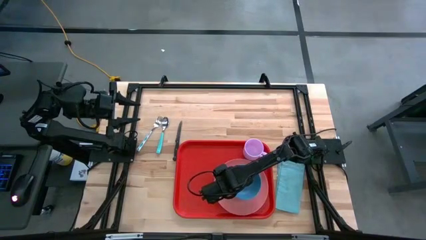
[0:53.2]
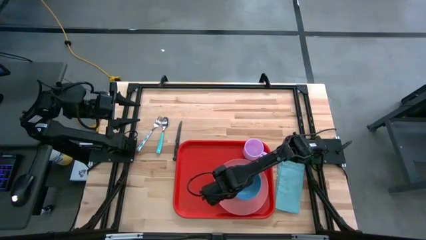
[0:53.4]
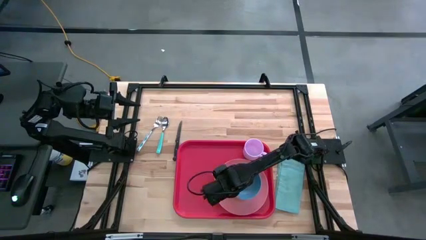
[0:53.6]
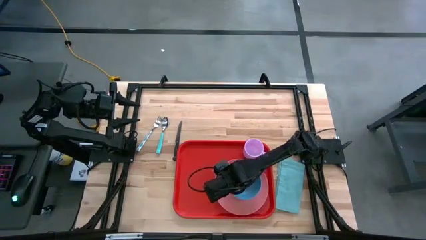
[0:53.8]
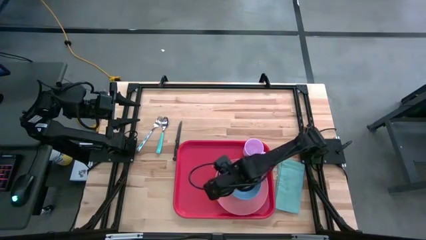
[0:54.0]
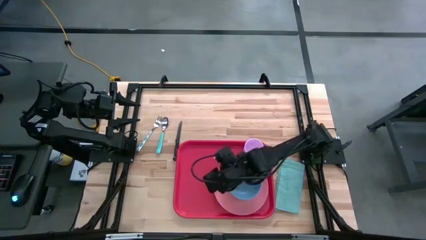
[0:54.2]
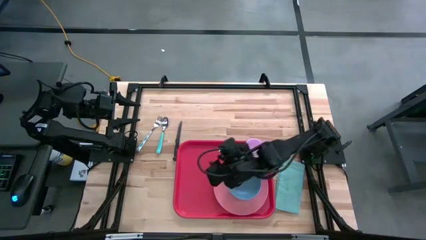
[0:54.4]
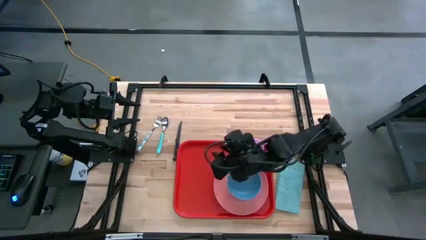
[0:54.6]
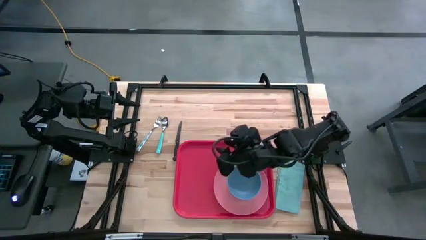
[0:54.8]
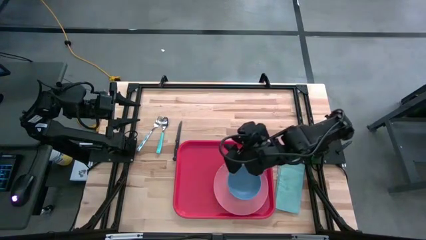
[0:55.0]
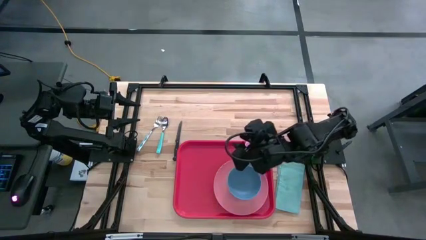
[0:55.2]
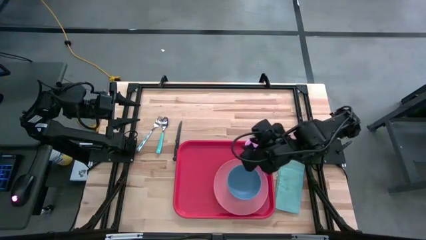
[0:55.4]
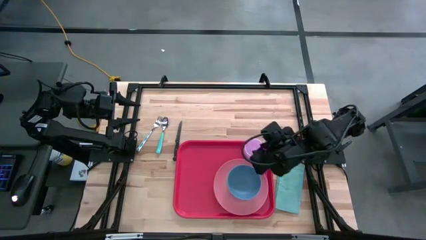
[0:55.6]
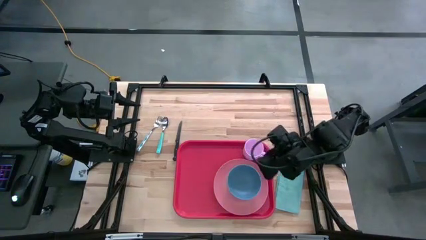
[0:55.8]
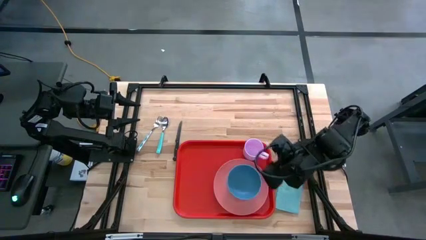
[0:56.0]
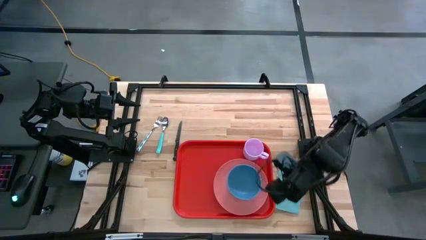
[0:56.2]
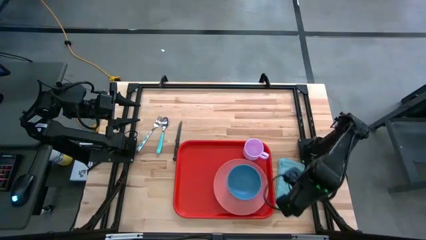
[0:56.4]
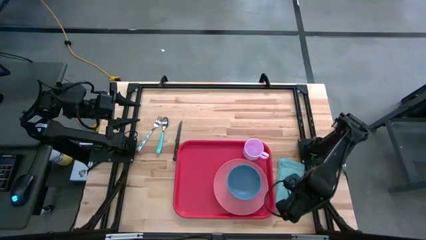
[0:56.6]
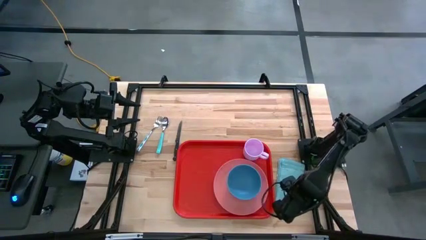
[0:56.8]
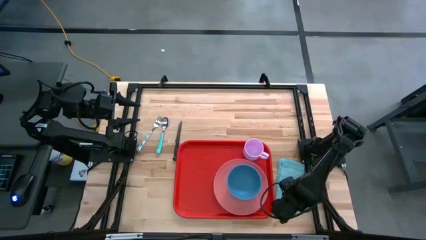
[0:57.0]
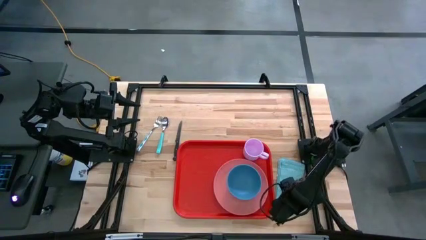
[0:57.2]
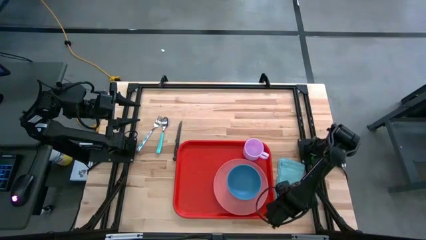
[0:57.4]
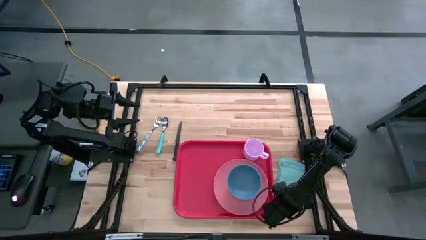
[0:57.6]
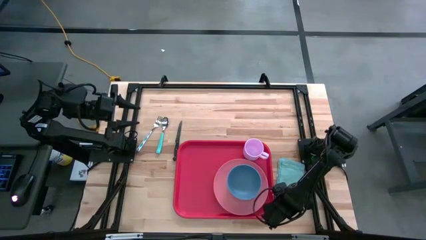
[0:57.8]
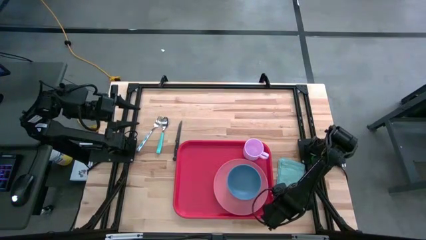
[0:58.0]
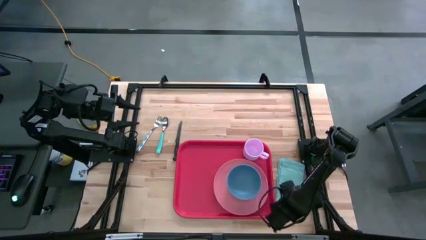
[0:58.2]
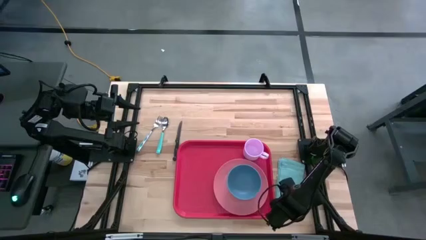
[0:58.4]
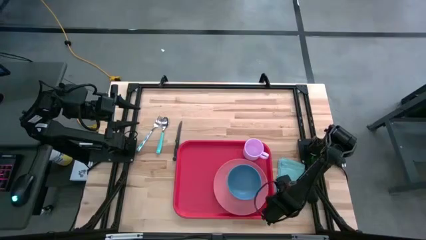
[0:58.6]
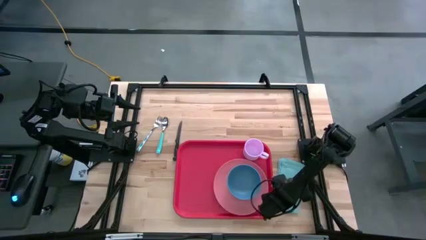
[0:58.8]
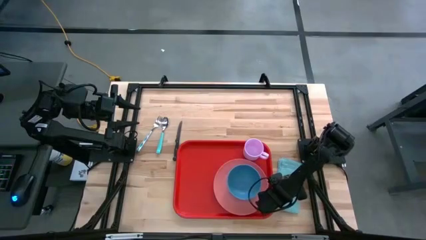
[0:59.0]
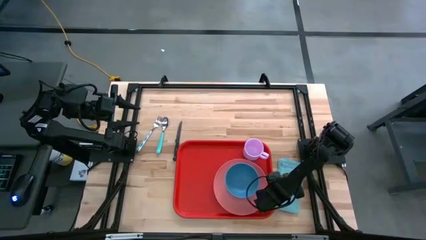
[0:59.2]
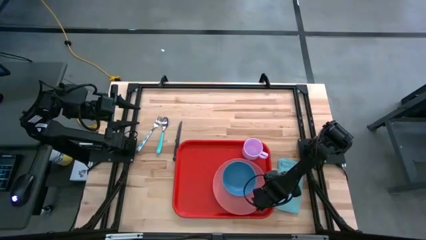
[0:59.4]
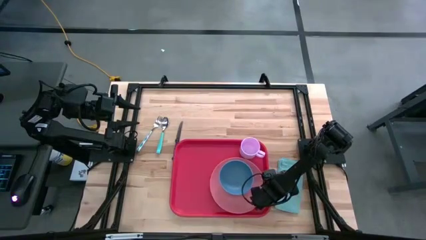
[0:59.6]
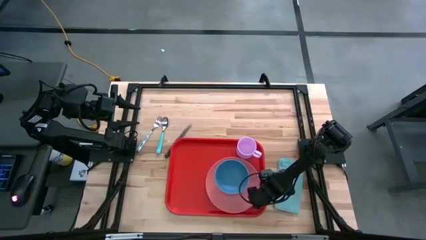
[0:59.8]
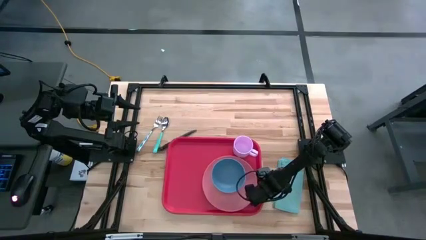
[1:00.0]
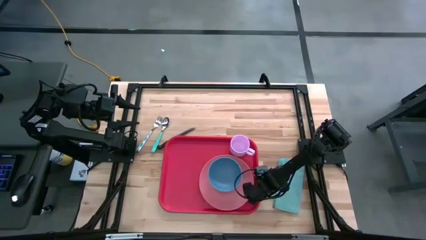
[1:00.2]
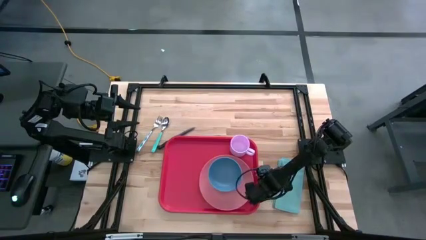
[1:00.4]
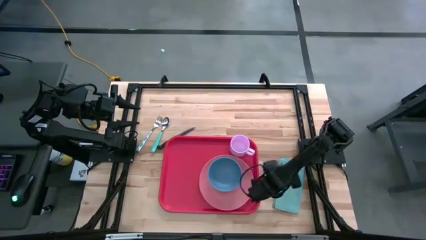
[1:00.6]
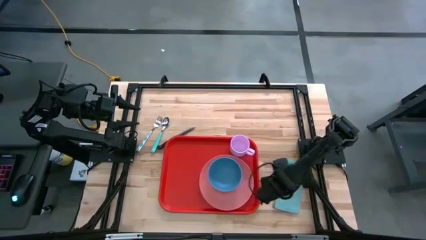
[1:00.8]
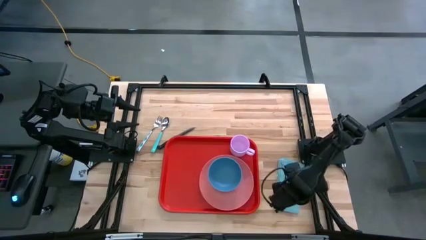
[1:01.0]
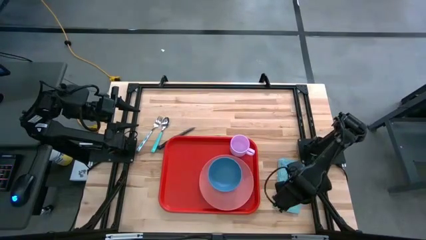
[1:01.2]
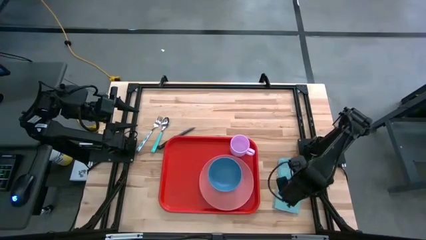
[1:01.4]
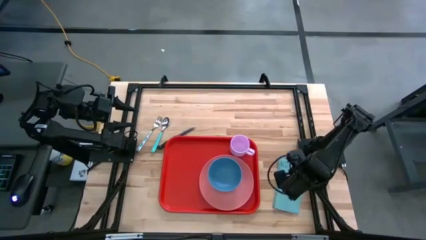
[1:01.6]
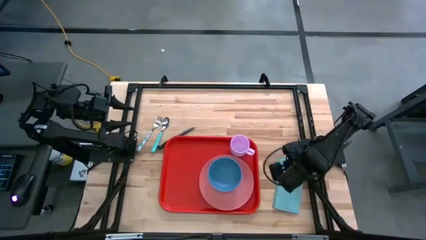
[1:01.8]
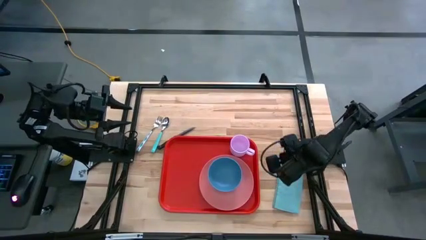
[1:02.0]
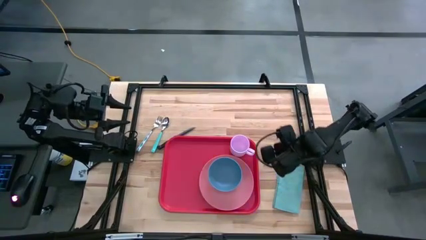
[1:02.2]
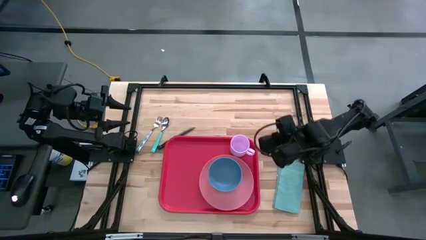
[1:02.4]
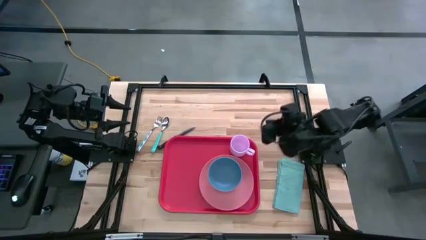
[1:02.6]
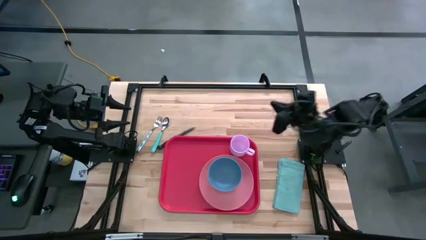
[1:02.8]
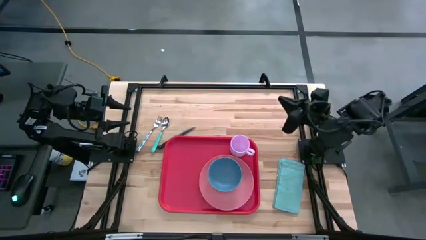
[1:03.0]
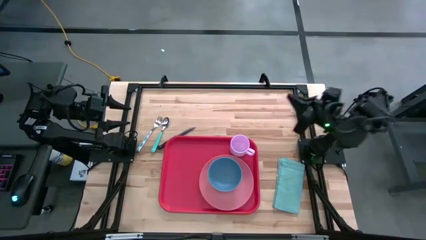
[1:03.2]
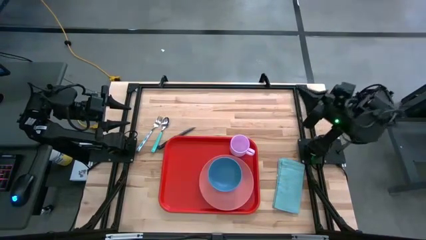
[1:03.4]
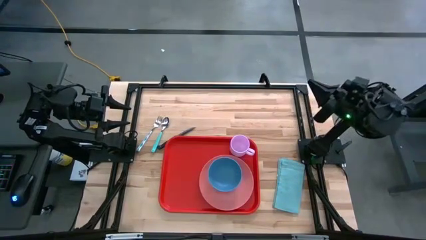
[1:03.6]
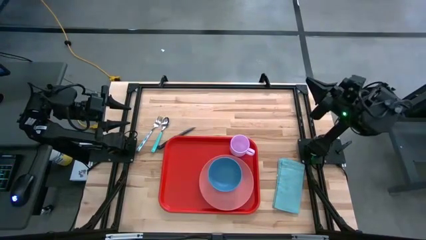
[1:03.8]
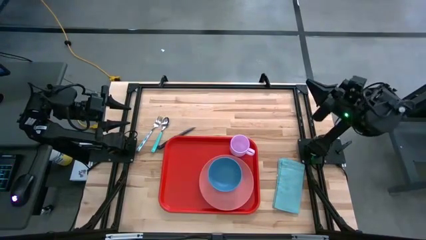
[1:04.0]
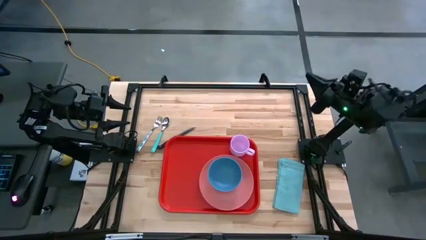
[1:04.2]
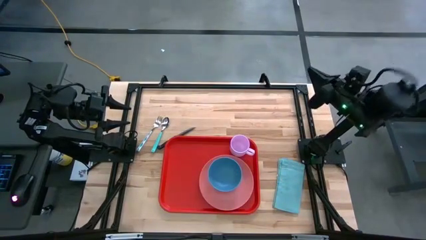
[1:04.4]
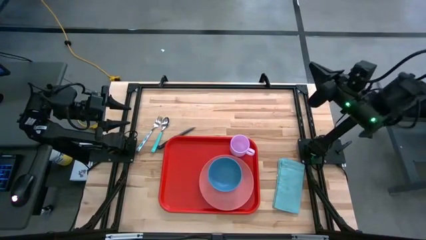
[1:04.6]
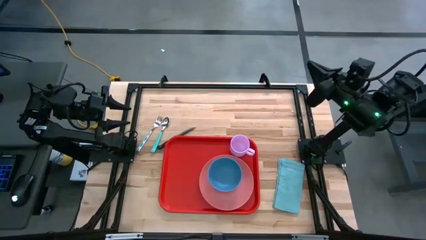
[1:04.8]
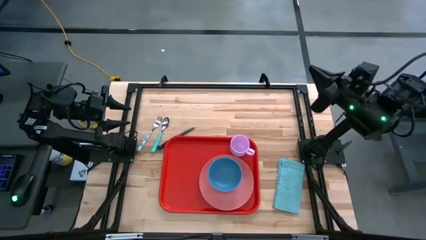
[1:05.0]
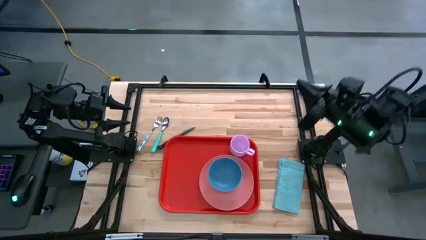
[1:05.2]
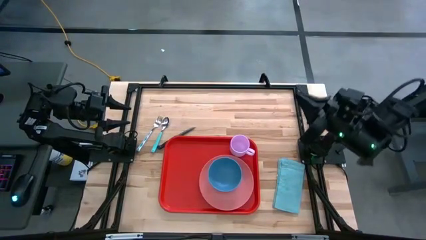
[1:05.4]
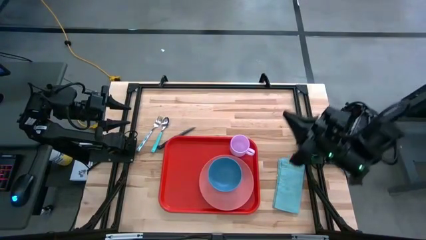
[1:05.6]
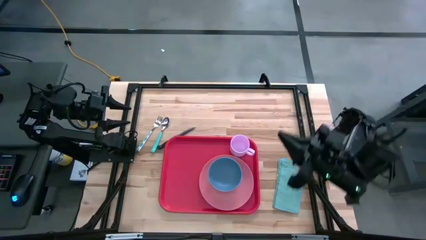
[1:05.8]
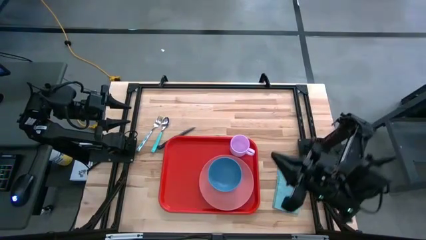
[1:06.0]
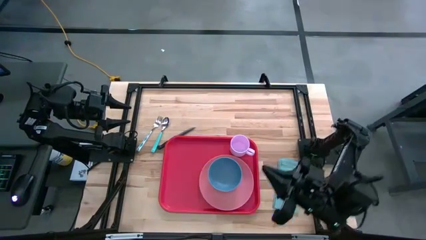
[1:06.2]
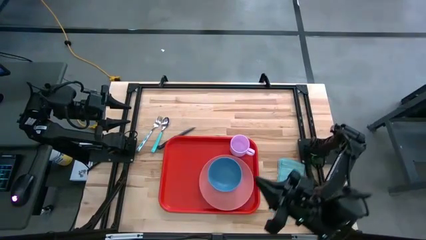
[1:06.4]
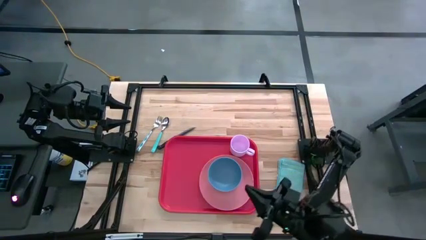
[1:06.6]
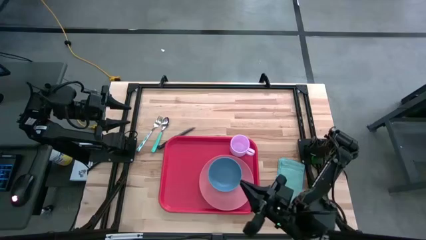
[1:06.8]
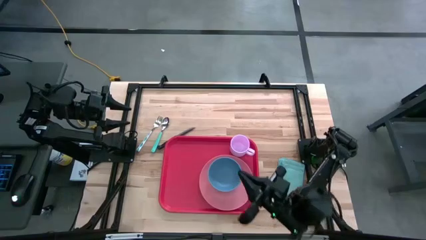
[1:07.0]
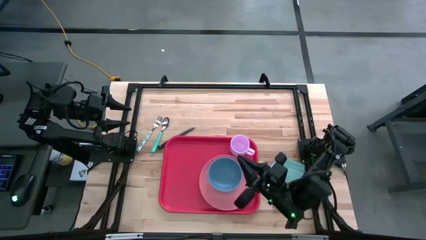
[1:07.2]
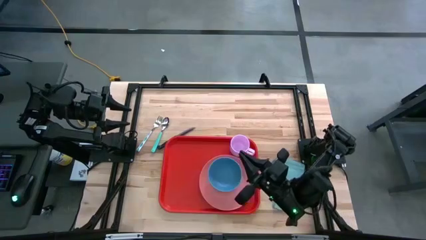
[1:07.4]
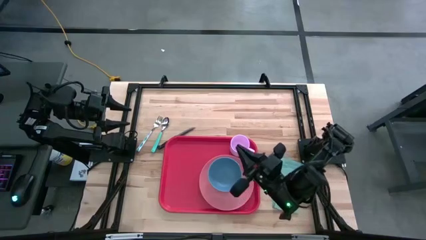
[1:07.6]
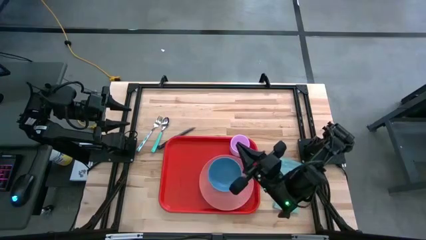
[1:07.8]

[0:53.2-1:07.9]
Task: Set up tray
Put the blue napkin into the pink serving tray
